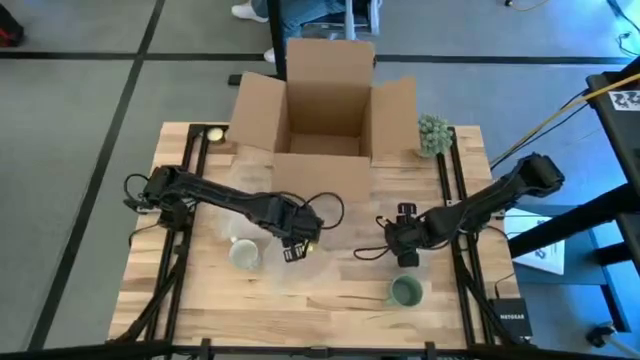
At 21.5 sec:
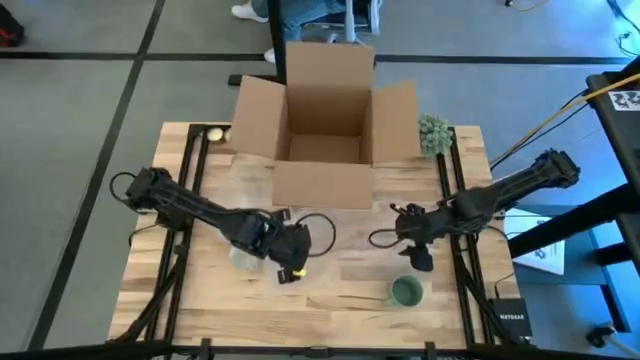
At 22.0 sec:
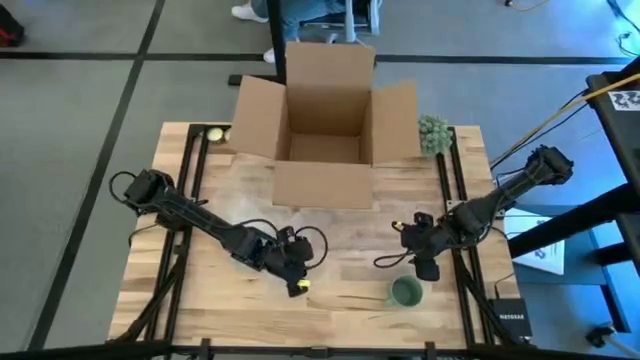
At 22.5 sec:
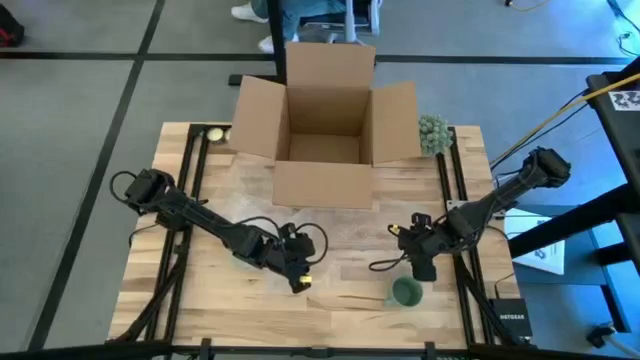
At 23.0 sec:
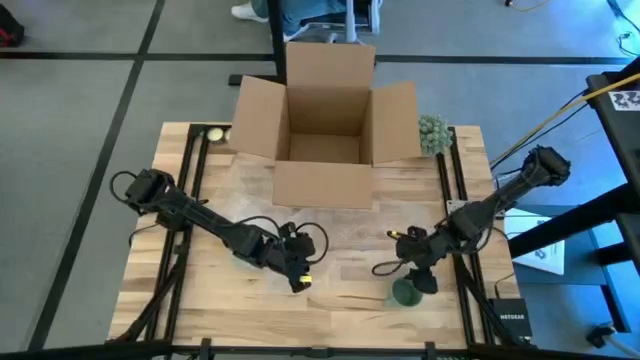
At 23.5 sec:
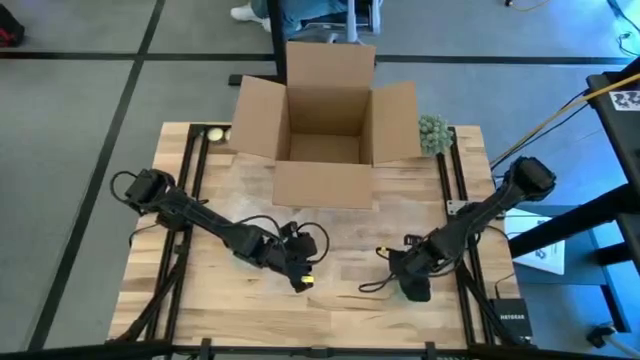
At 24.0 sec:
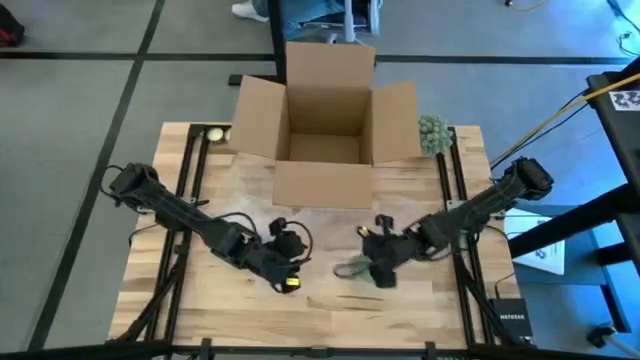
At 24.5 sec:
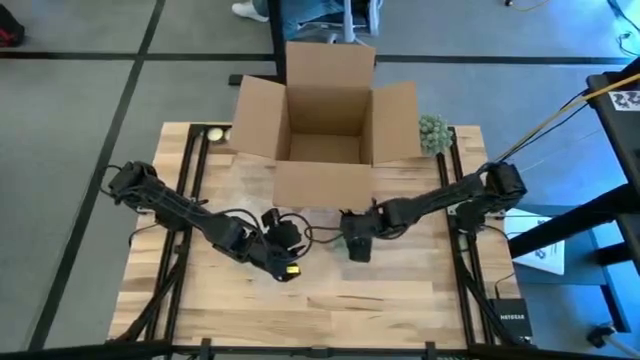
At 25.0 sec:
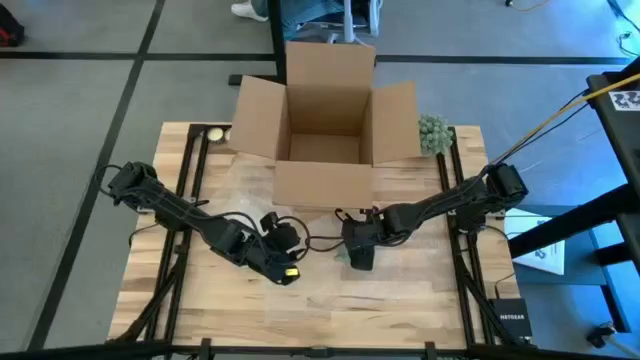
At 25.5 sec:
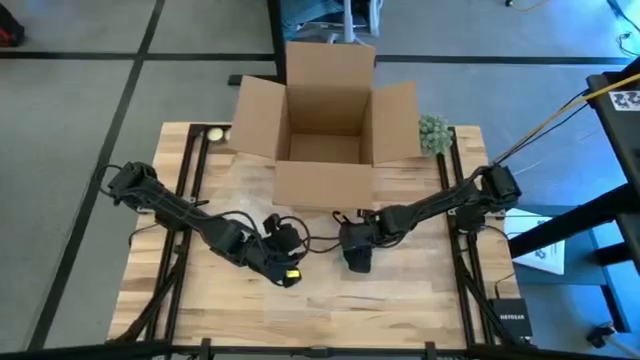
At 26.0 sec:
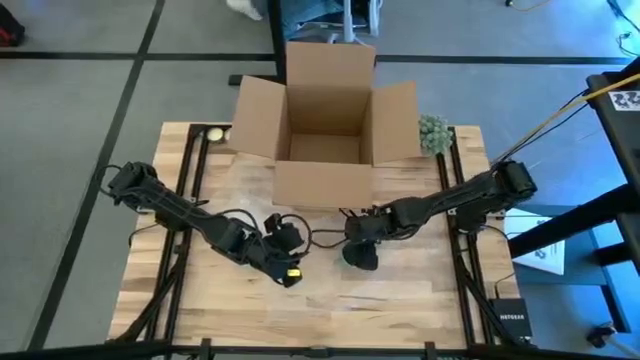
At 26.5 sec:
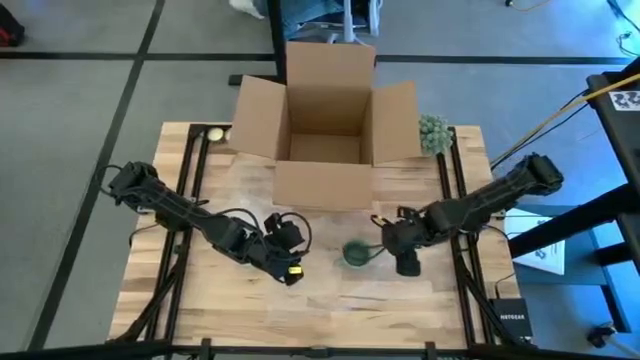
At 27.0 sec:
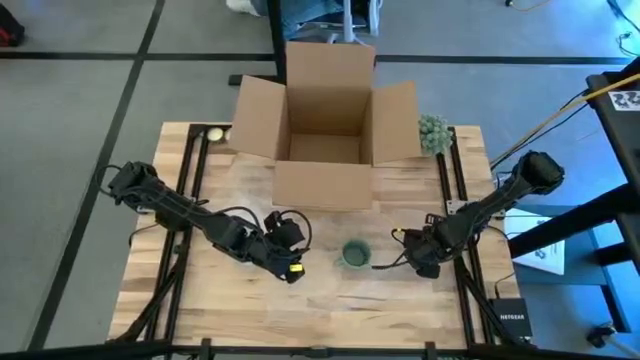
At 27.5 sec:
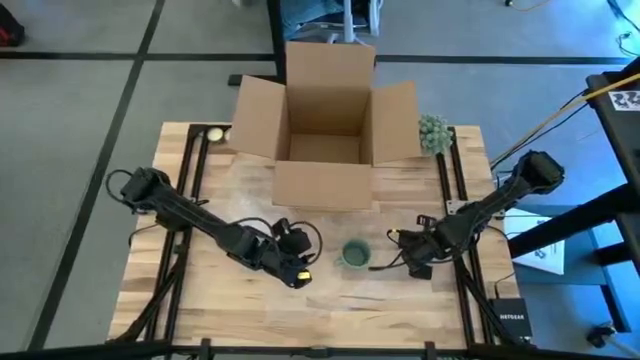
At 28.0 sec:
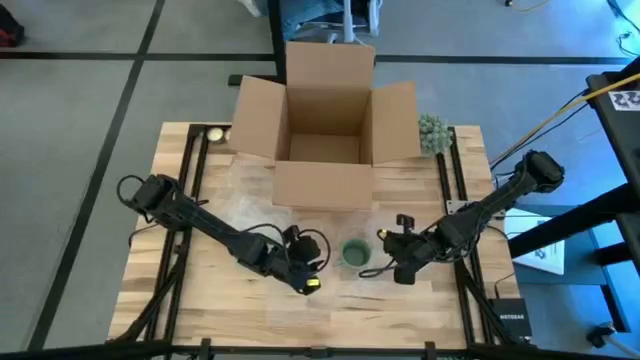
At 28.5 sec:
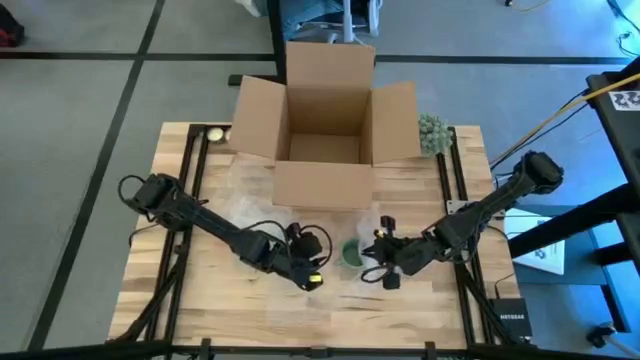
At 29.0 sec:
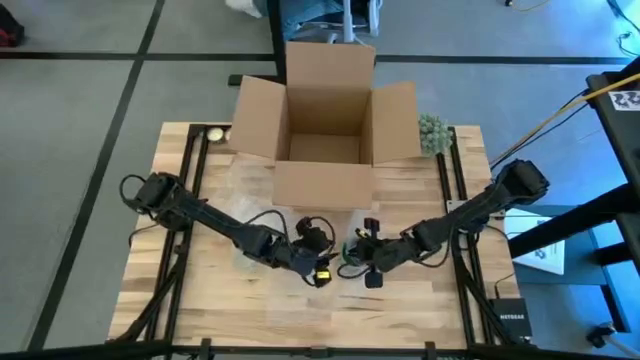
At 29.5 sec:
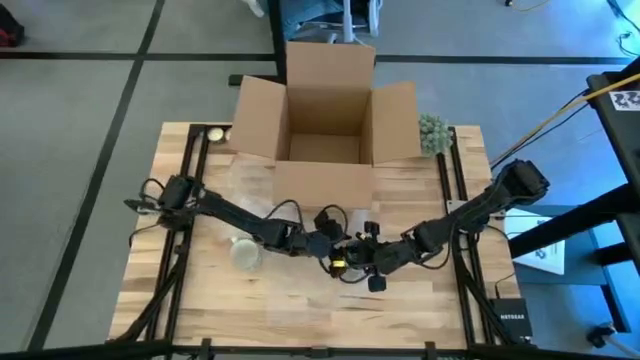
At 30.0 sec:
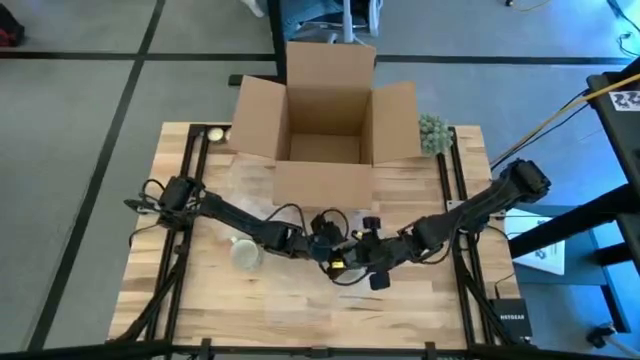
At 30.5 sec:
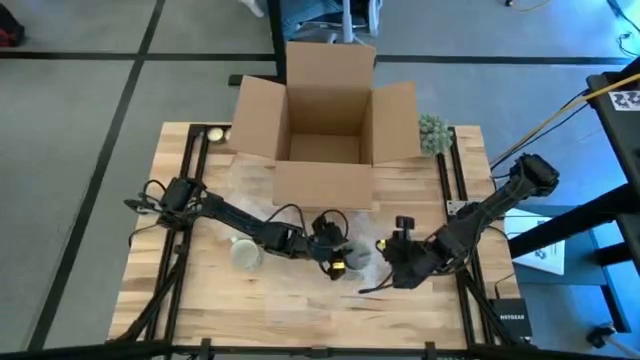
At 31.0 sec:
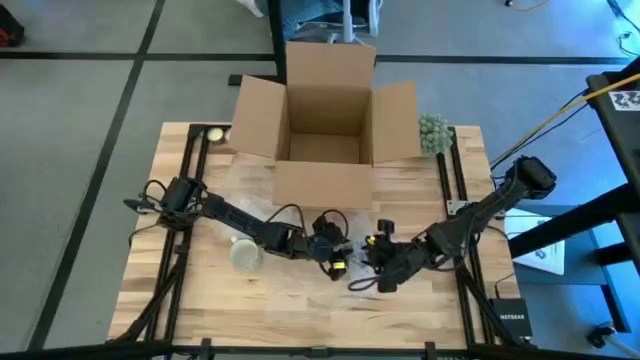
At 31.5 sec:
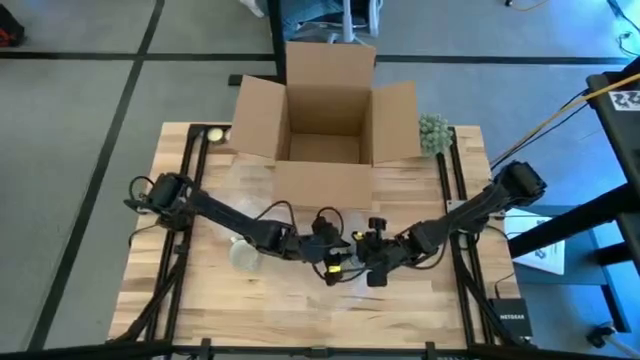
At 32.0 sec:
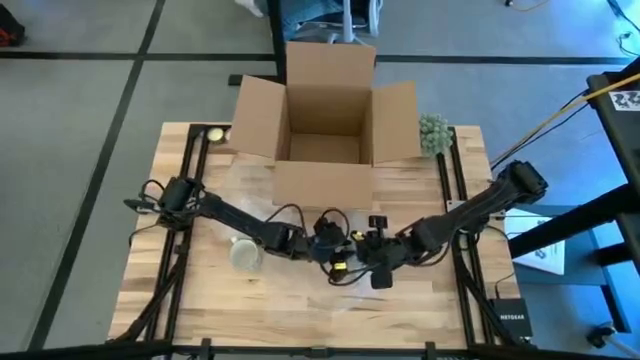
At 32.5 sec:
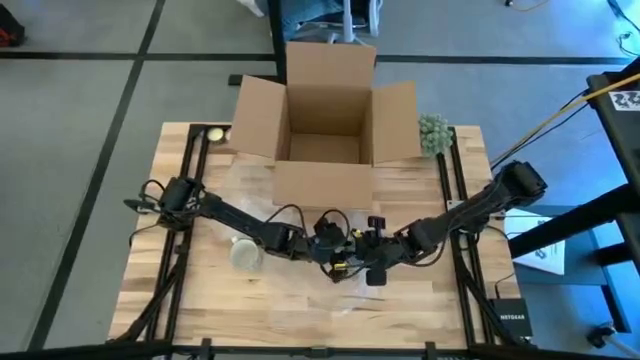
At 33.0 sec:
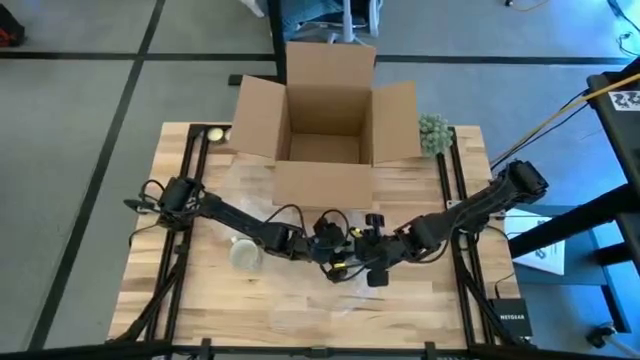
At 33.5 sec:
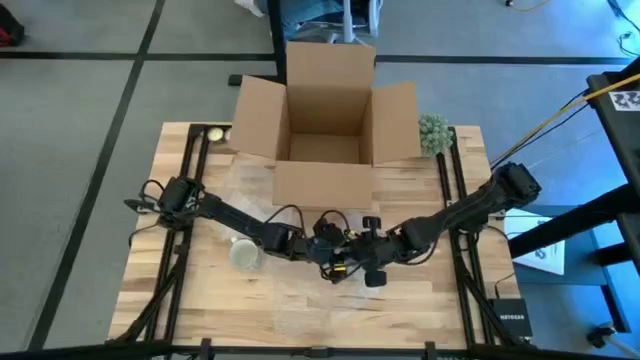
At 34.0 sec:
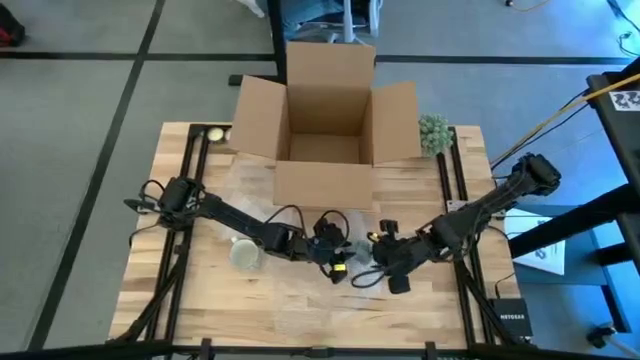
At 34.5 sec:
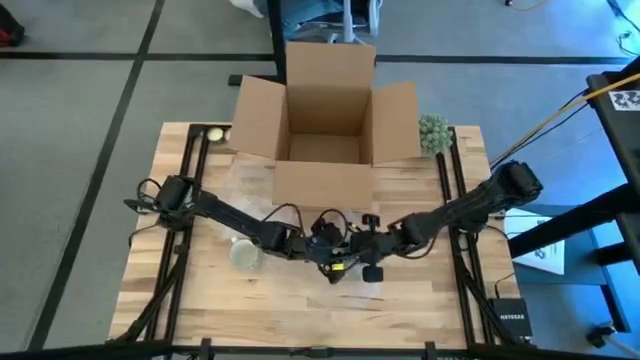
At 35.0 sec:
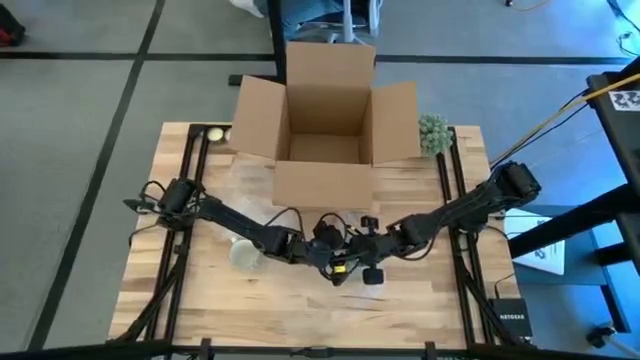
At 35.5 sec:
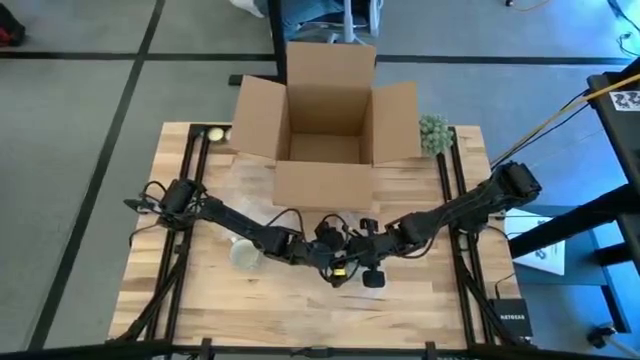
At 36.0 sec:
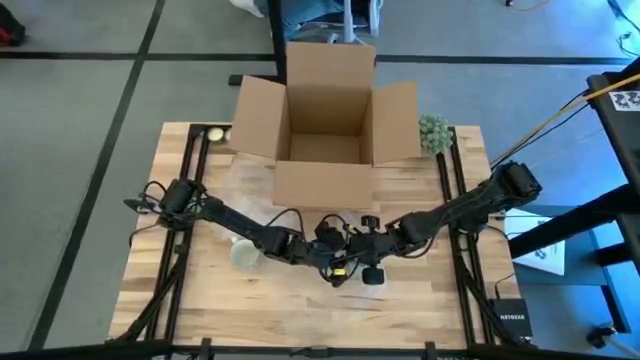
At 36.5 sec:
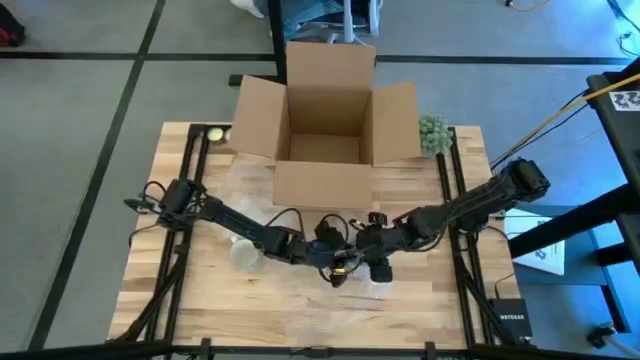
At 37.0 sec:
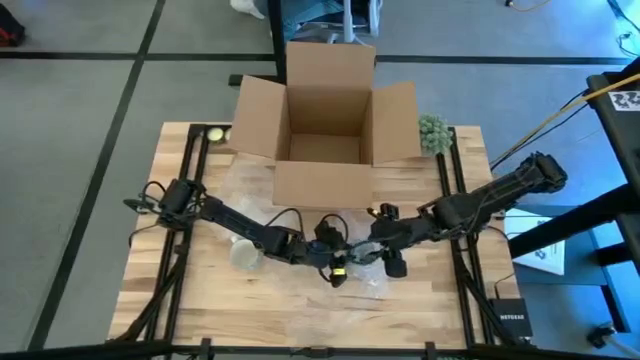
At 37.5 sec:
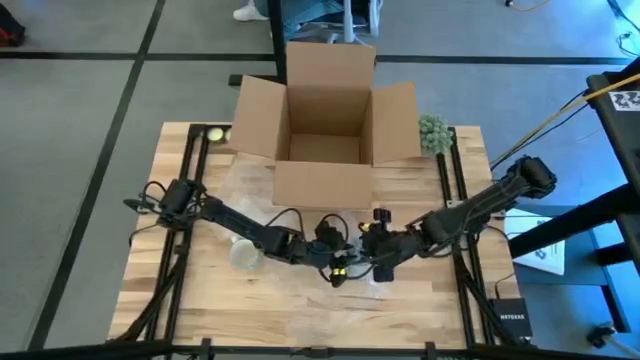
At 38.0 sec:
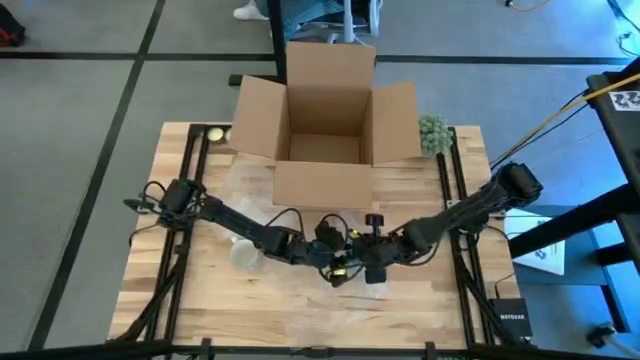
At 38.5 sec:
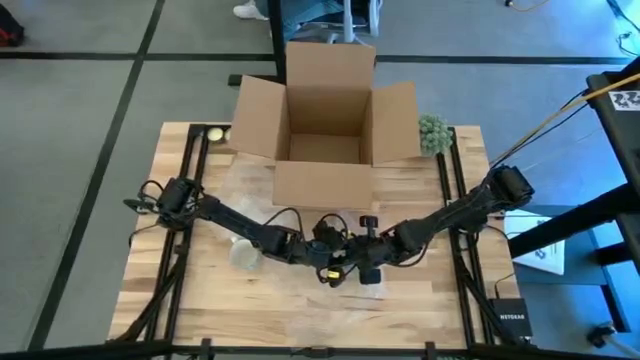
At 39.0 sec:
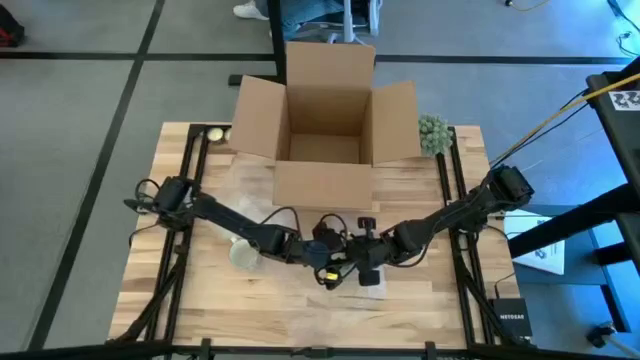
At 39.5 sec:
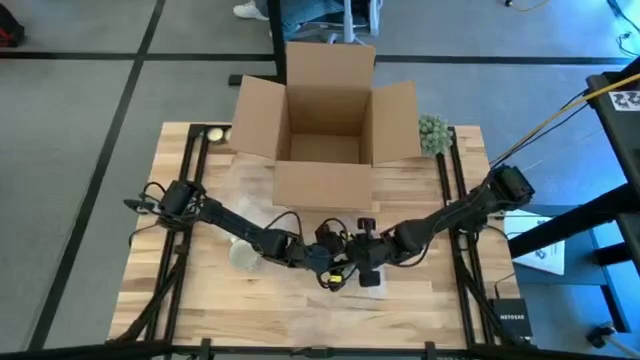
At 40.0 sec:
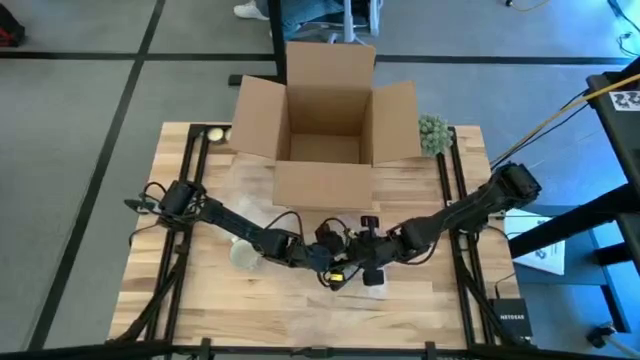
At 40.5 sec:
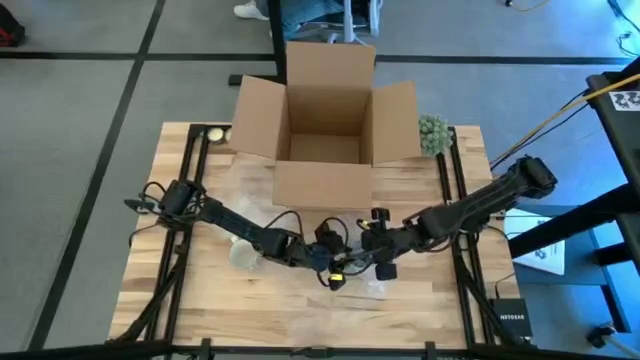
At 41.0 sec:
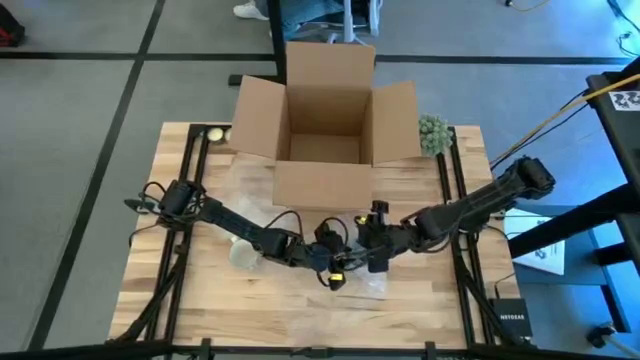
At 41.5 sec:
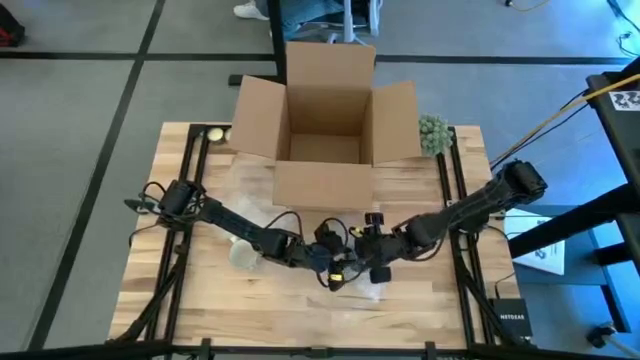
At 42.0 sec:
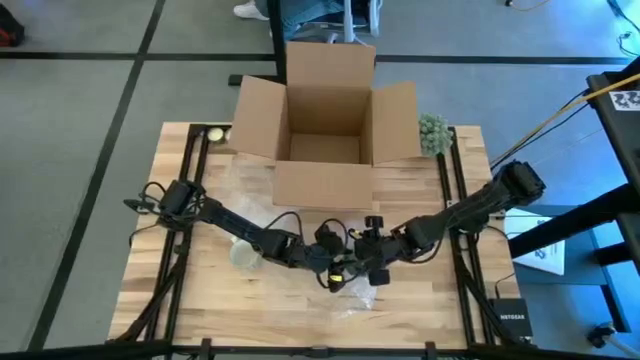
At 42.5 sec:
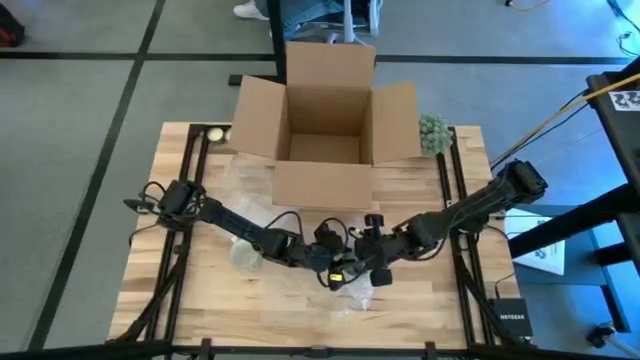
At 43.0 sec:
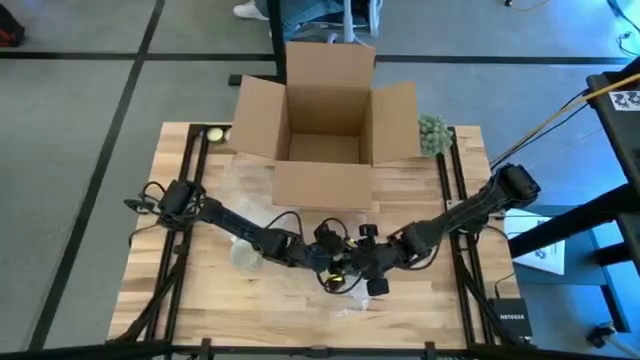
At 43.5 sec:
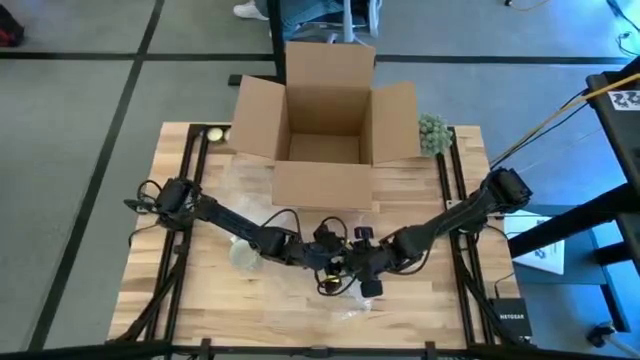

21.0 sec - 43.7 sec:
Task: wrap mug
Wrap the green mug with the bubble wrap
